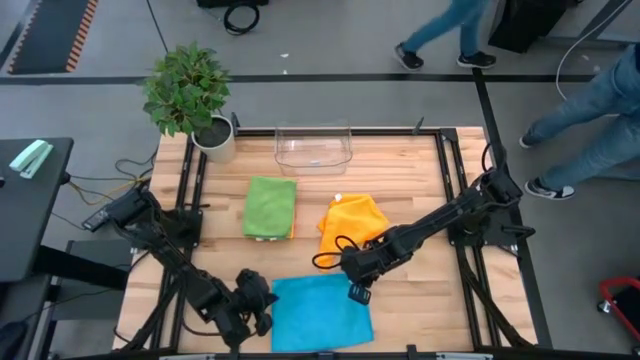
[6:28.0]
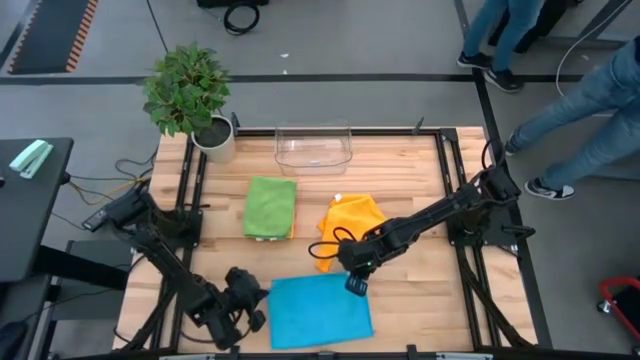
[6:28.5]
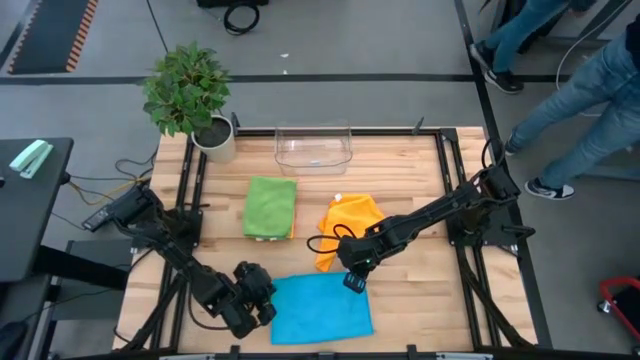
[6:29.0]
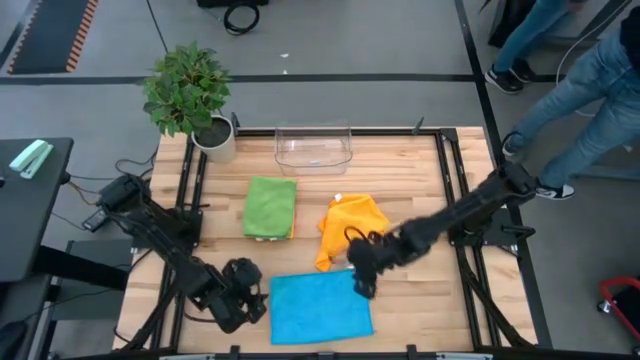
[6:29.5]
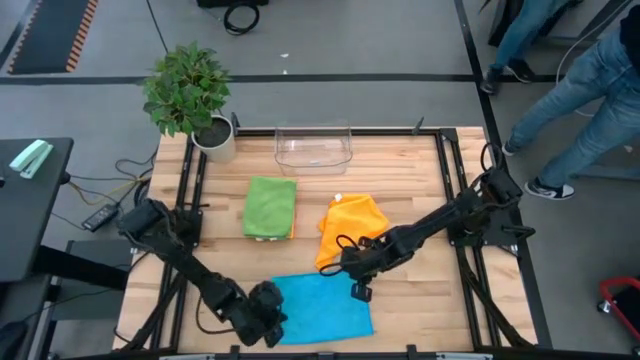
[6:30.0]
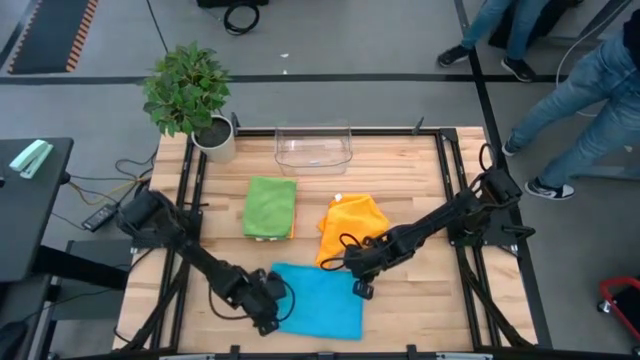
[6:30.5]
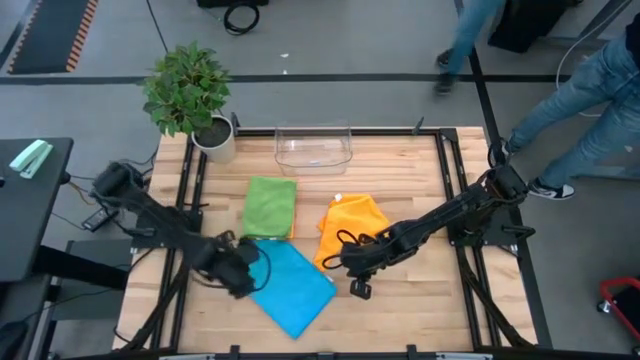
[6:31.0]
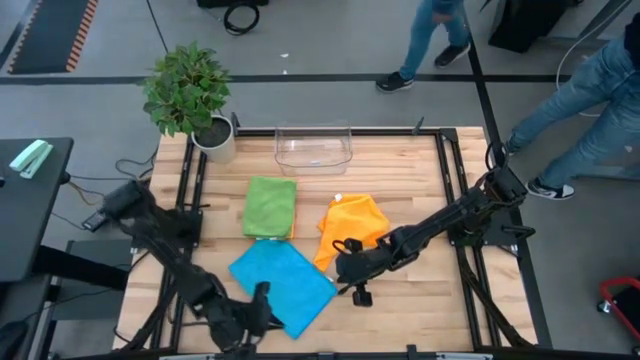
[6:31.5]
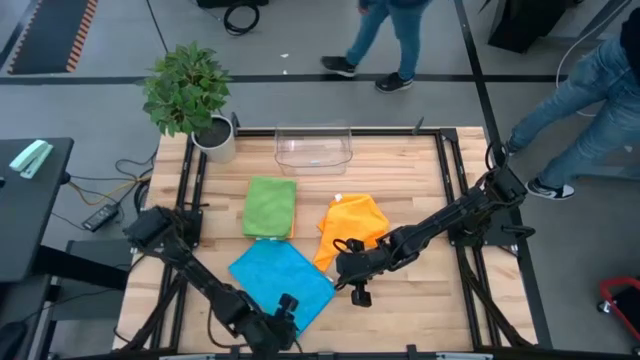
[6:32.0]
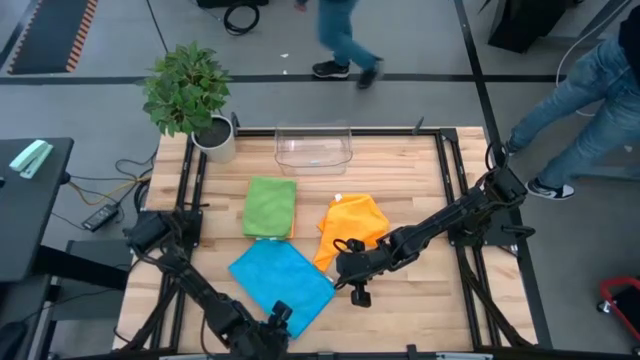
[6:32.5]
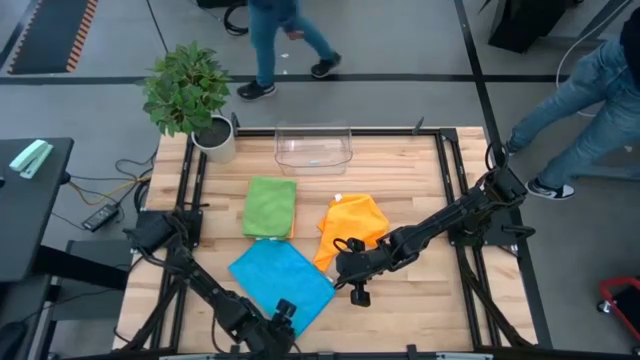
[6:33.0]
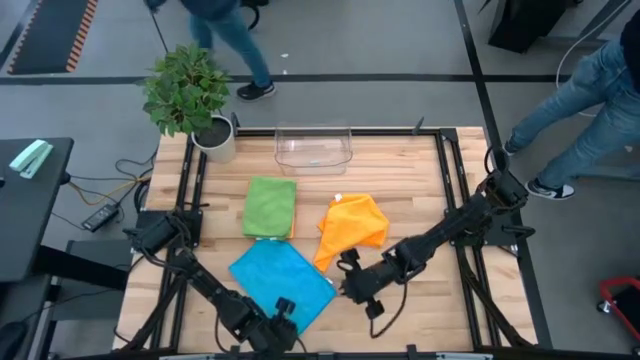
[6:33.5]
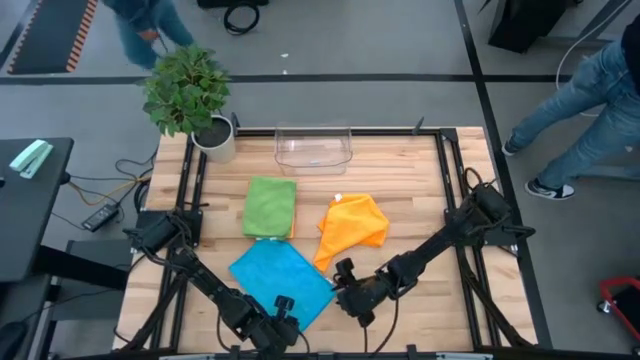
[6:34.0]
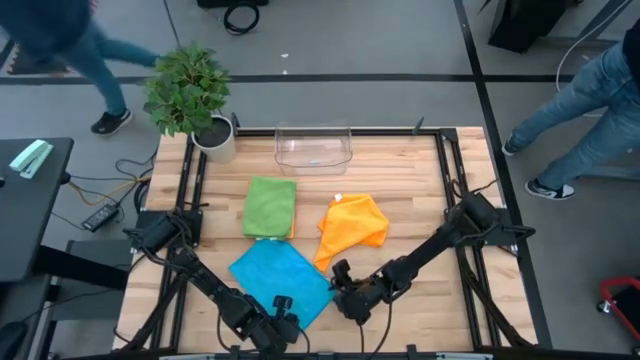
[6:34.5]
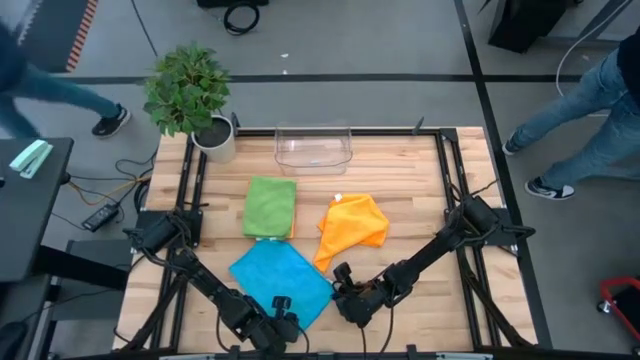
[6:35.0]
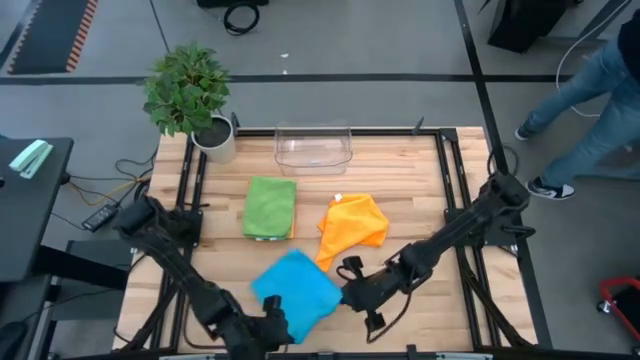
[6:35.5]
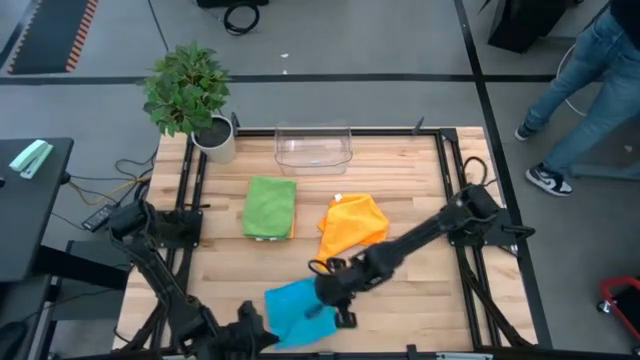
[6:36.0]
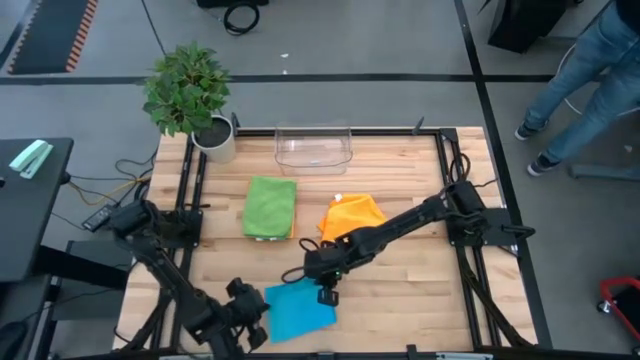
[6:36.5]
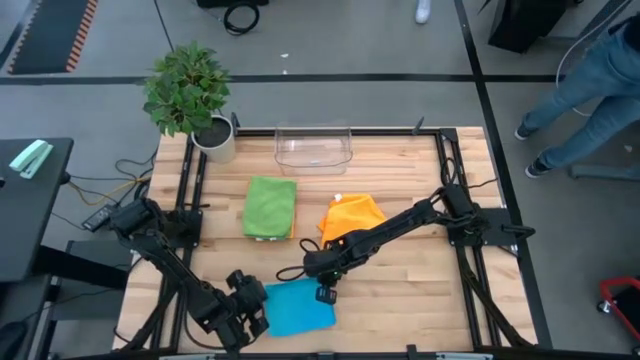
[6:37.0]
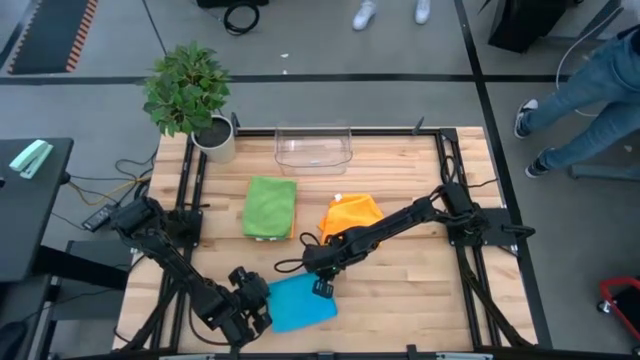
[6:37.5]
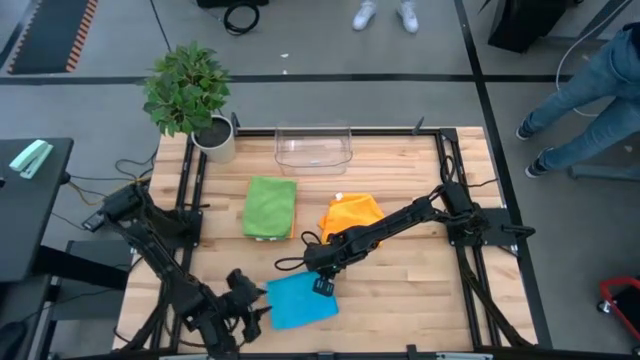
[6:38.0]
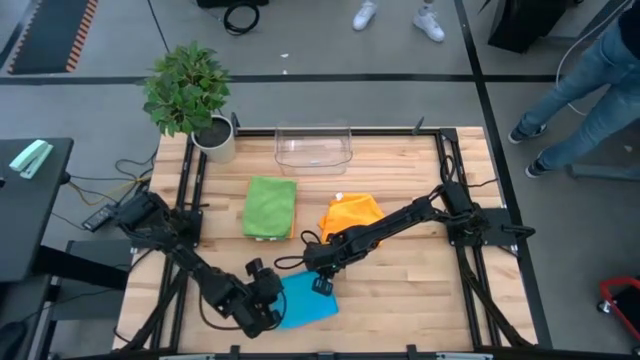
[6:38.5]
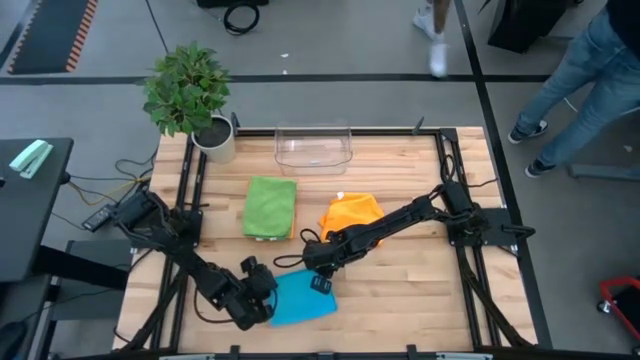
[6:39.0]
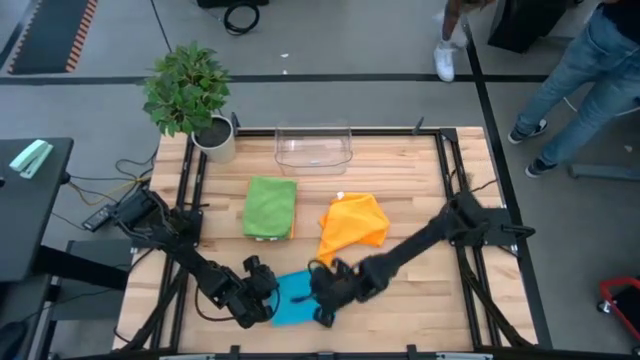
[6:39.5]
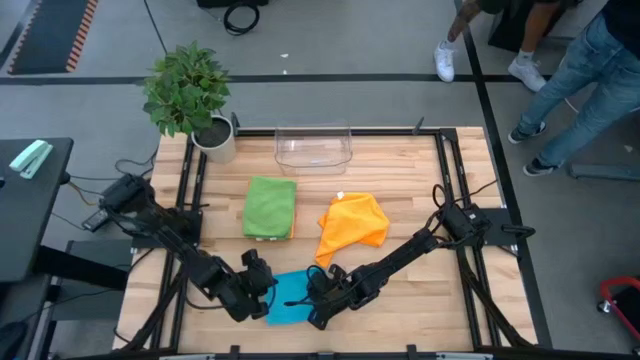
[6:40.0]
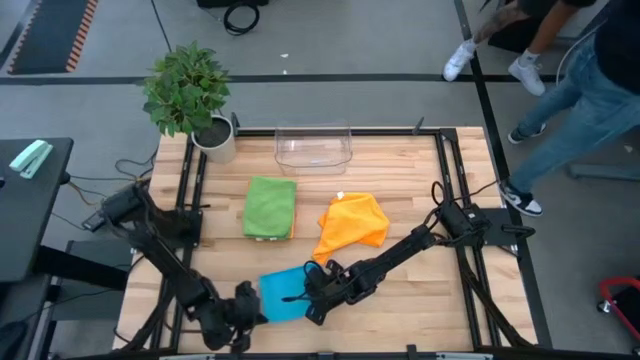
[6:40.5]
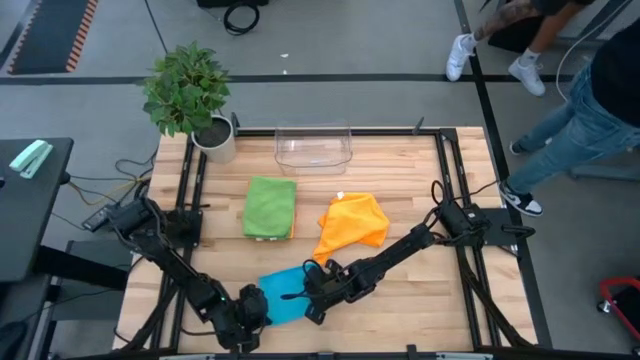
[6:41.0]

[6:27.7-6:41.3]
Task: Fold microfiber towels
Fold the blue microfiber cloth

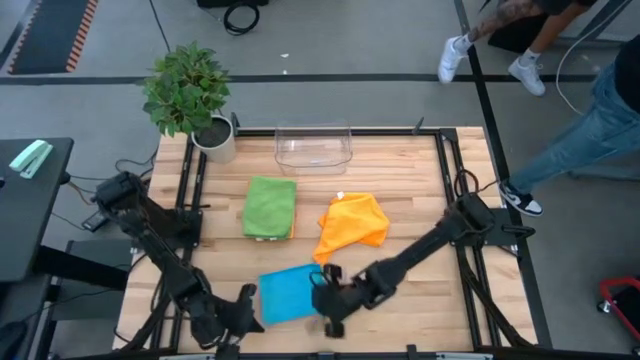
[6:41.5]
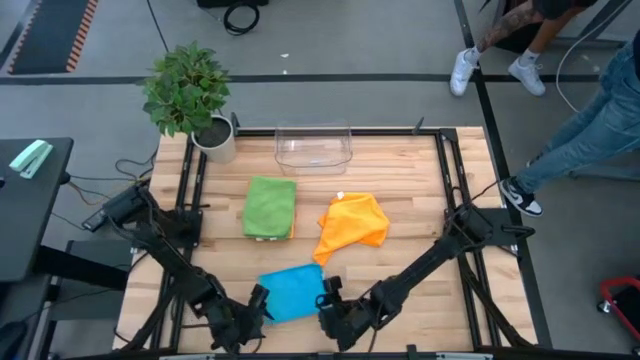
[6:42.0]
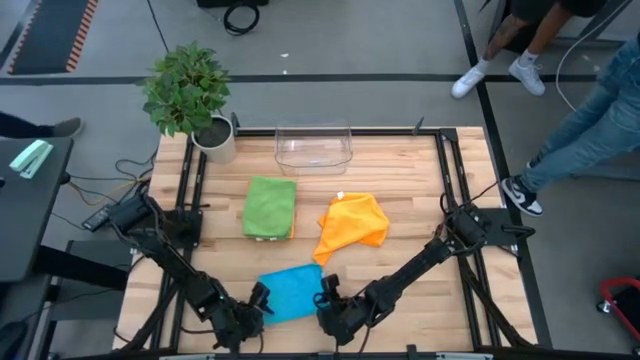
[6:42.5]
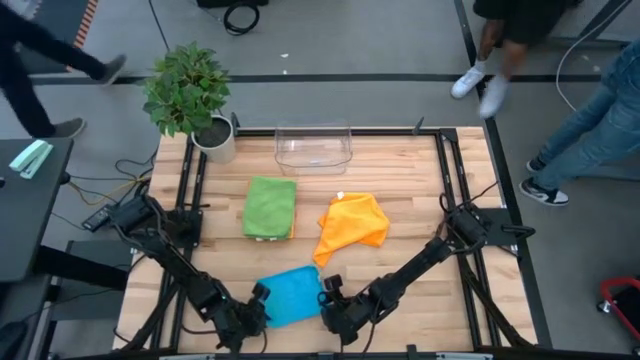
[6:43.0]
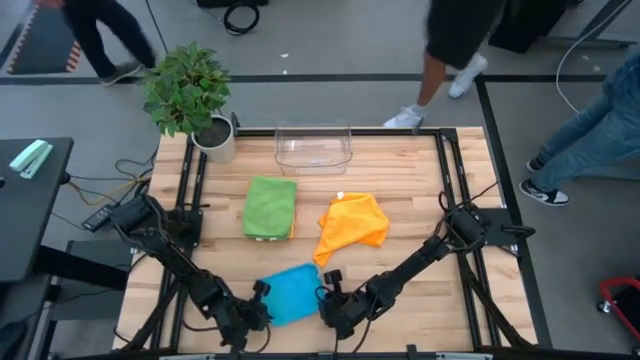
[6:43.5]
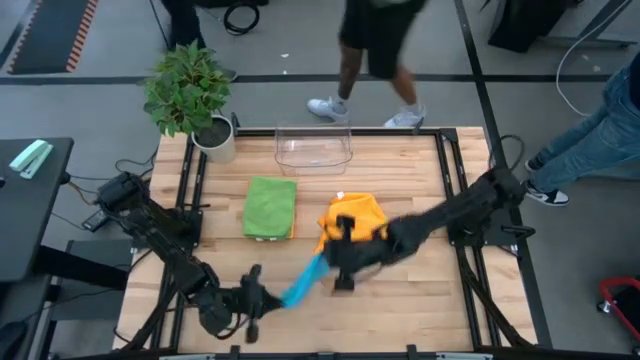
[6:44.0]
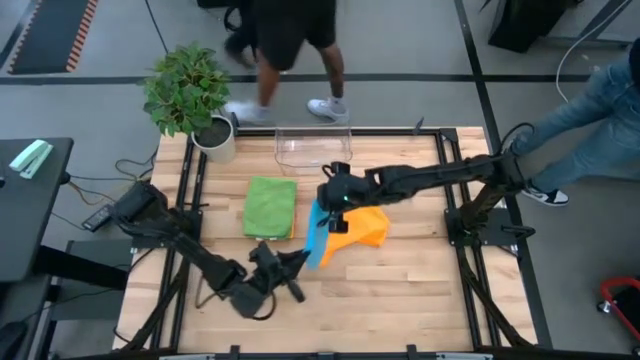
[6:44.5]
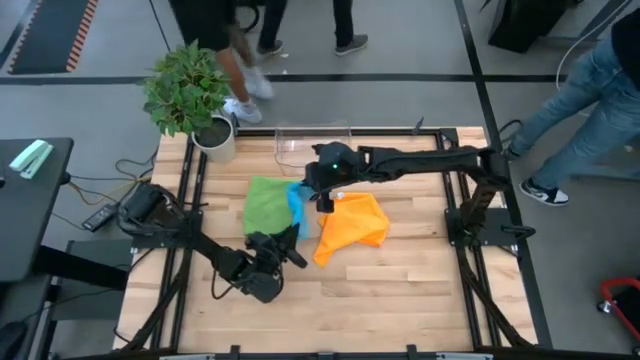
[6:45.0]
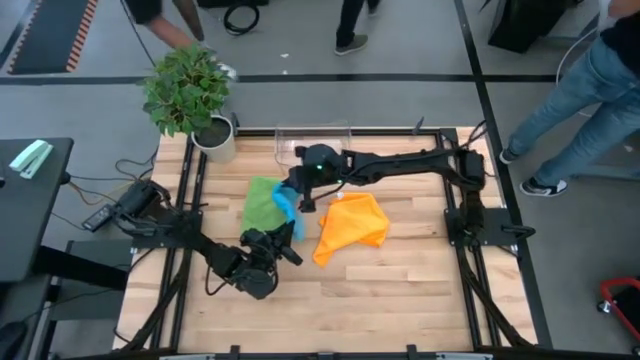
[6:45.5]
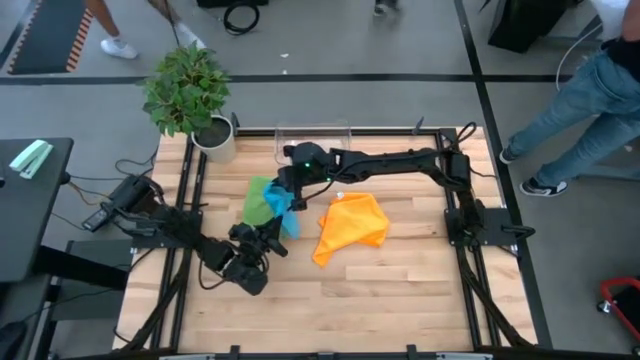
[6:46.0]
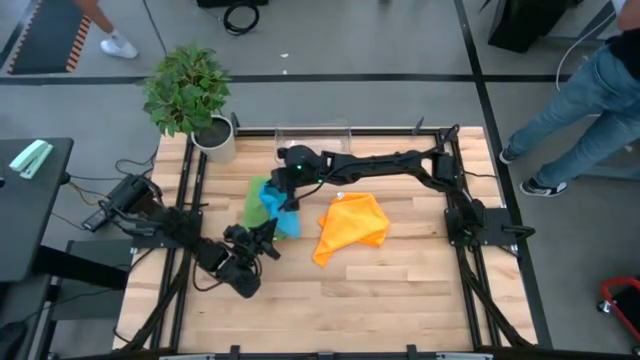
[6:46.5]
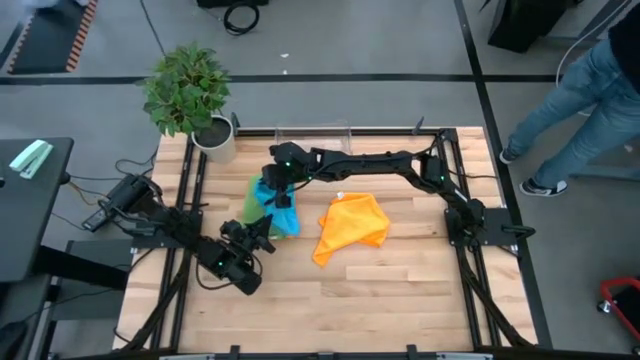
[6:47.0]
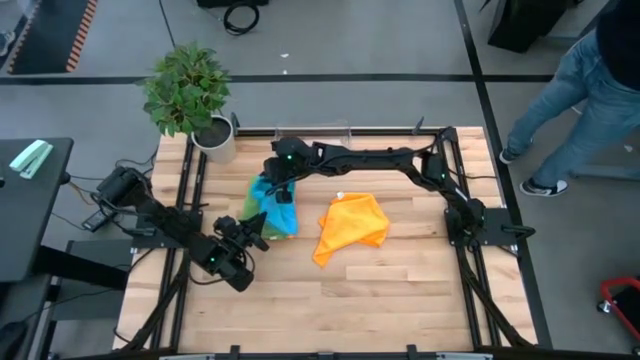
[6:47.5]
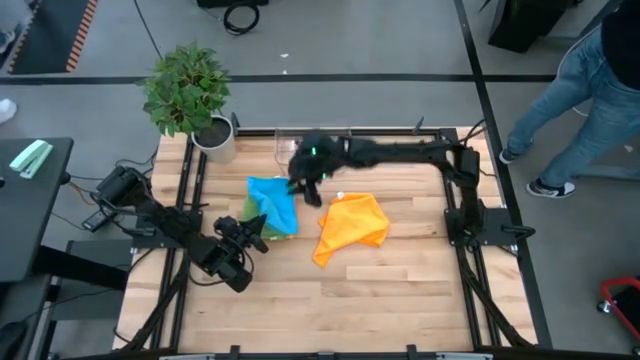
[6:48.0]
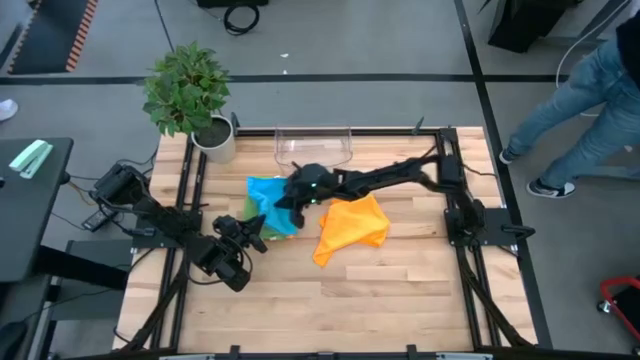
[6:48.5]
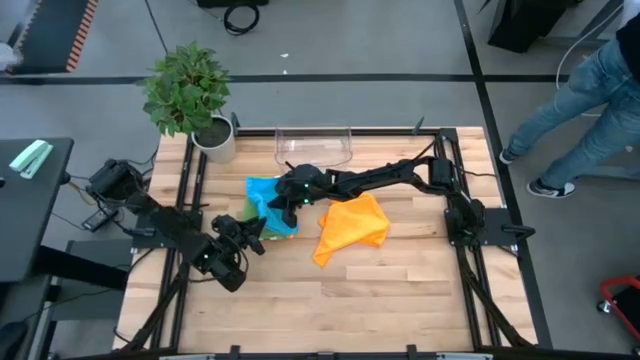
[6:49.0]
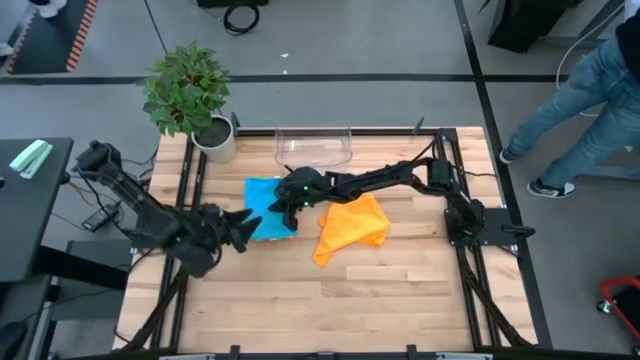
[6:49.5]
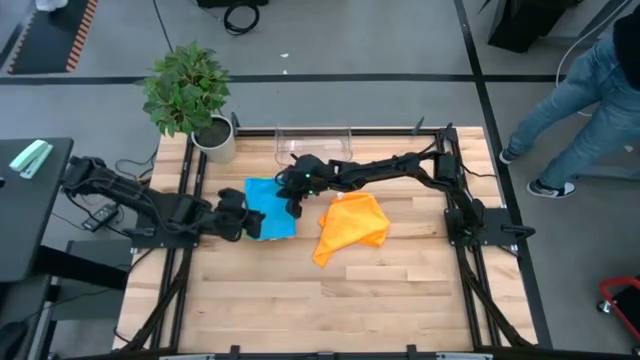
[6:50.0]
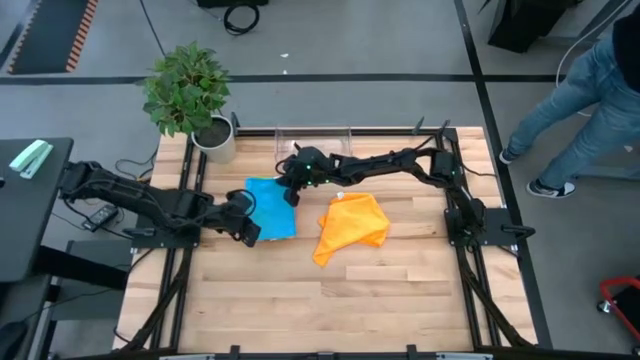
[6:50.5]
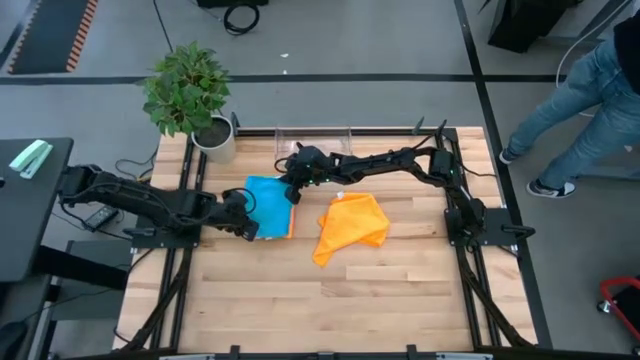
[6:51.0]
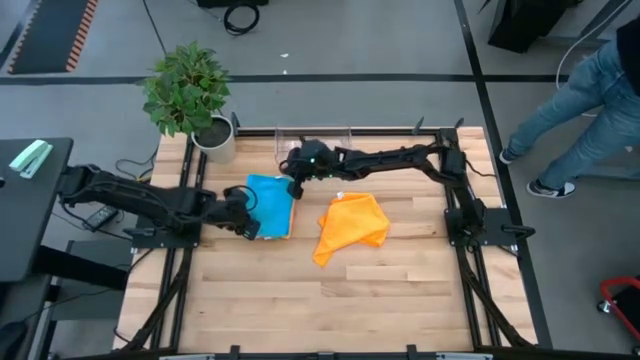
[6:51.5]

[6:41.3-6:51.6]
Stack the folded blue microfiber cloth on top of the folded green microfiber cloth
